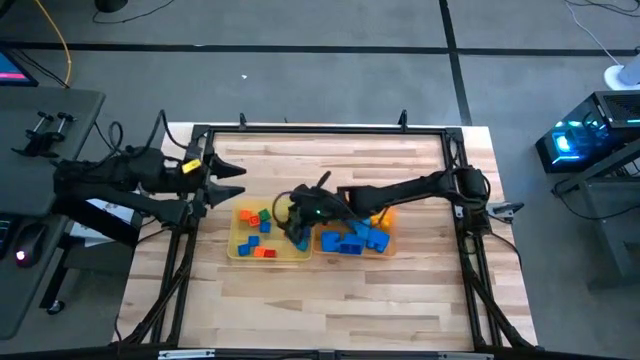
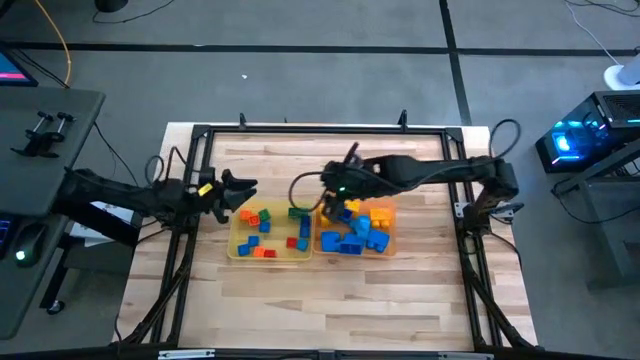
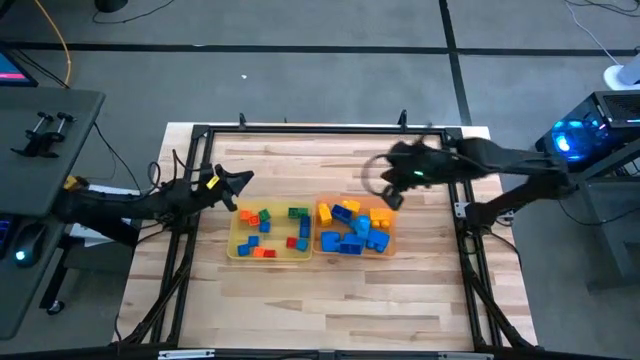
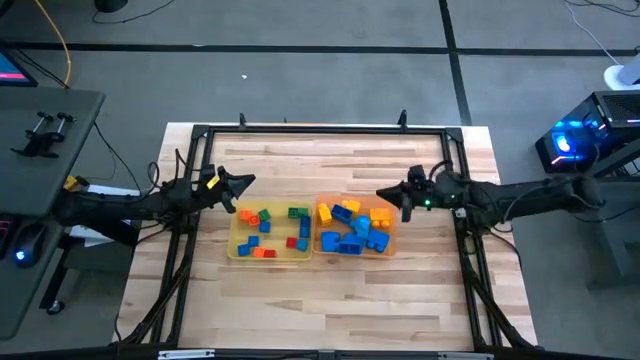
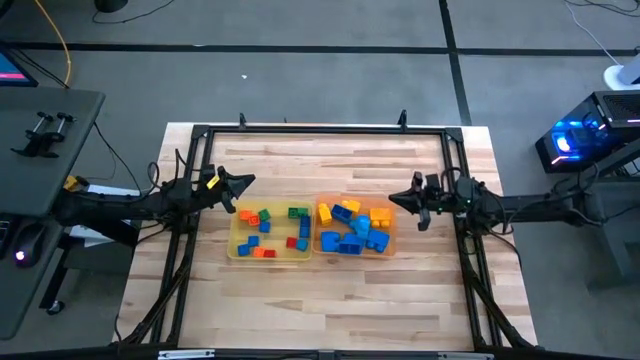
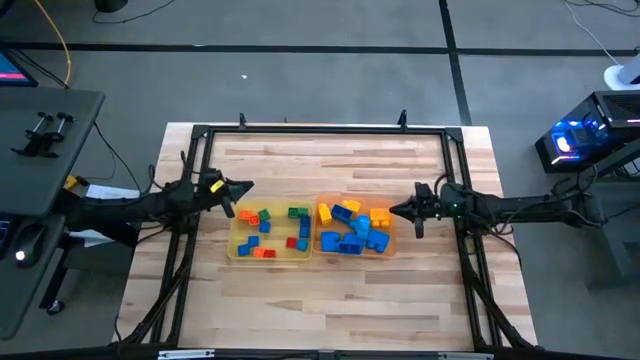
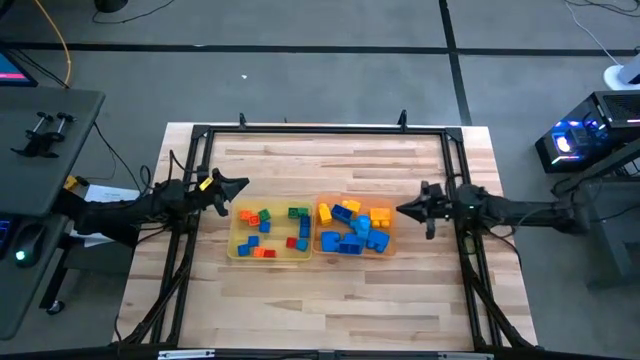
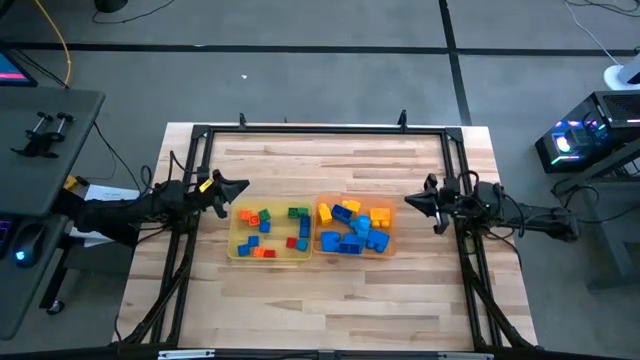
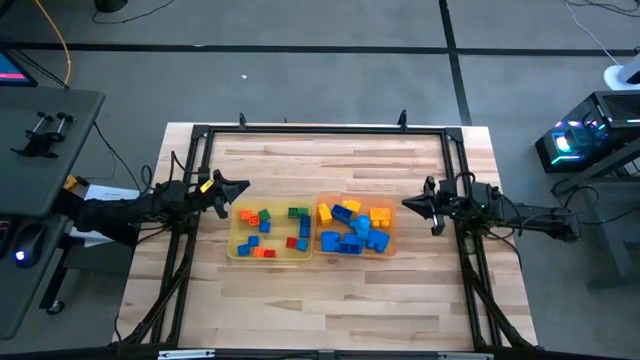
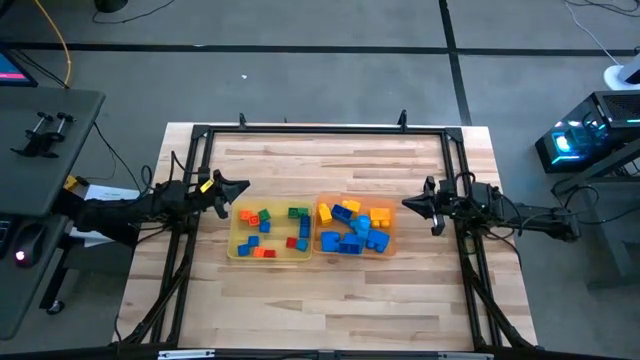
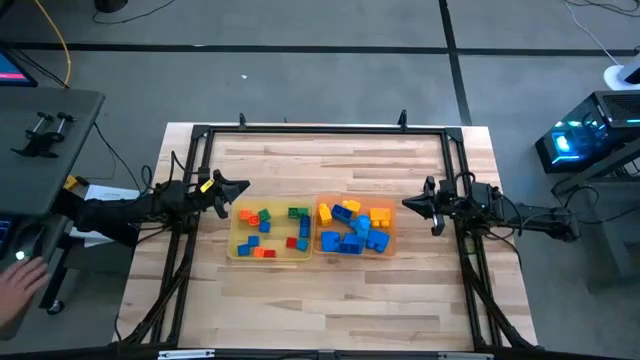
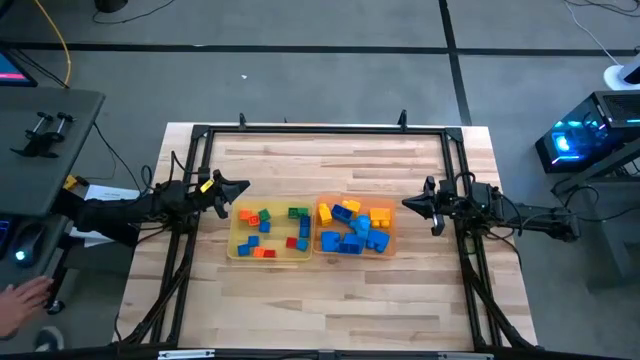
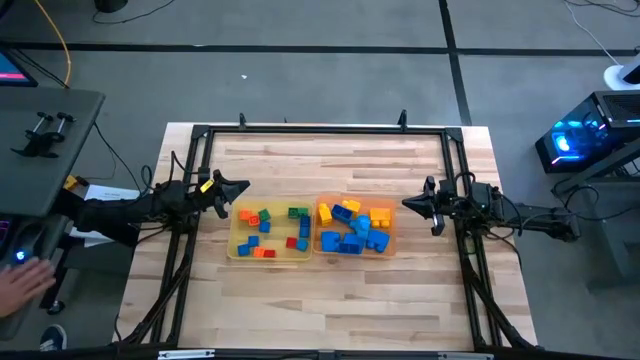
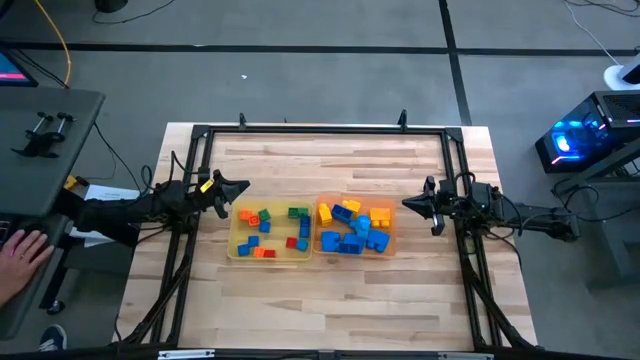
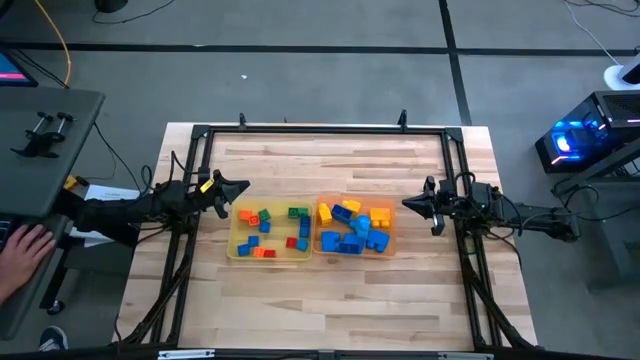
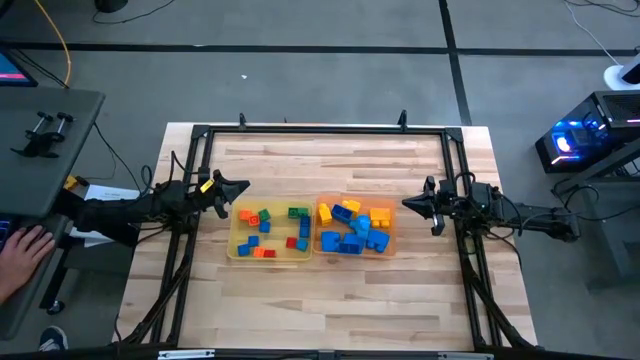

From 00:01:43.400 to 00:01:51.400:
Task: Sort blocks by size
Return to Home Position

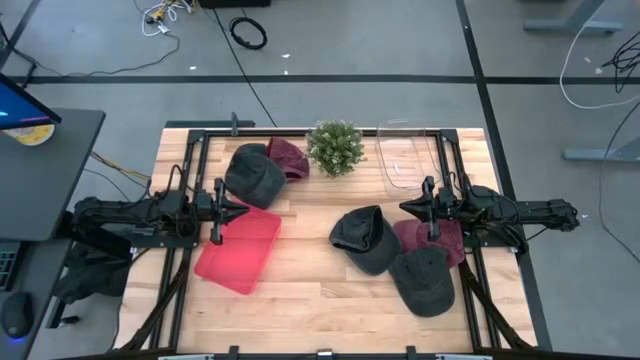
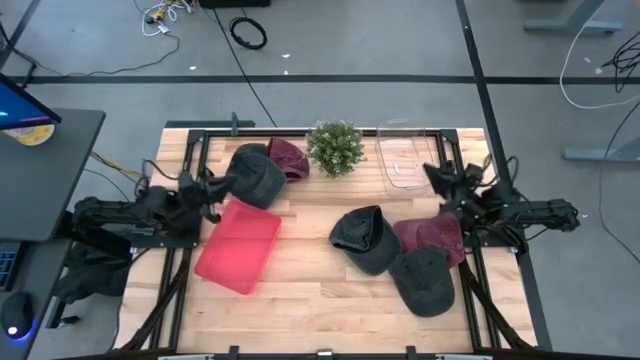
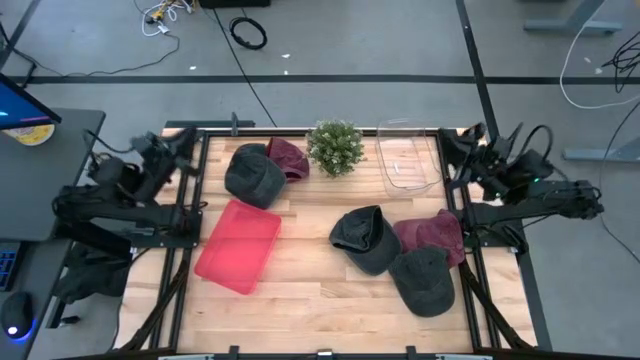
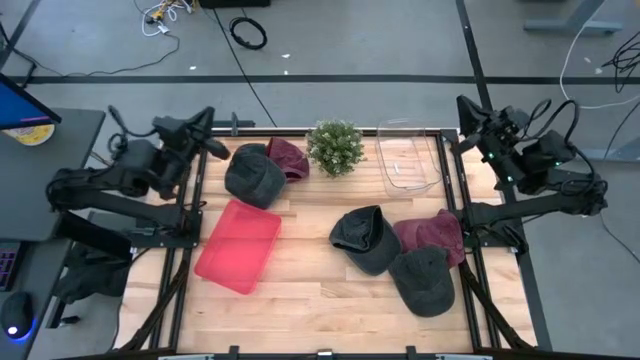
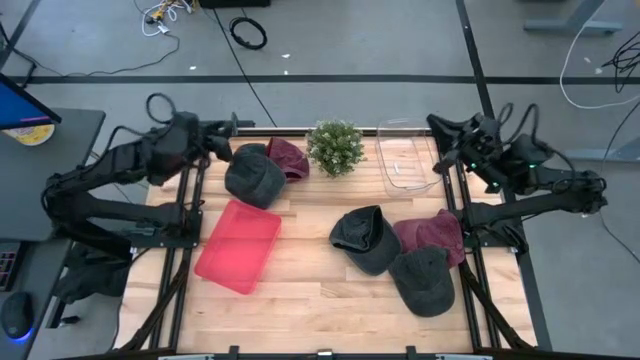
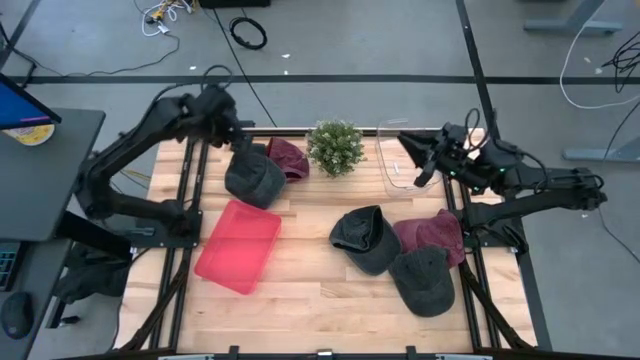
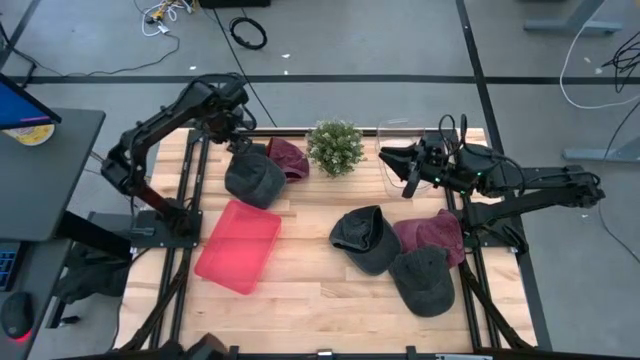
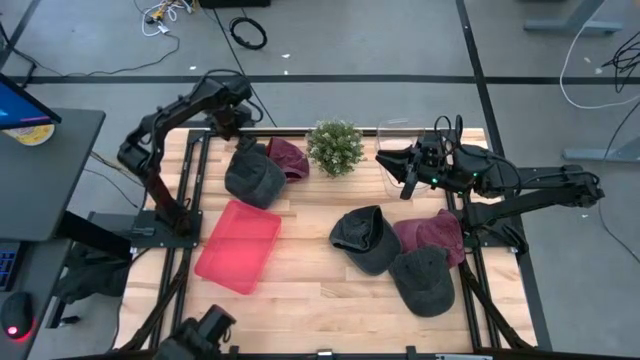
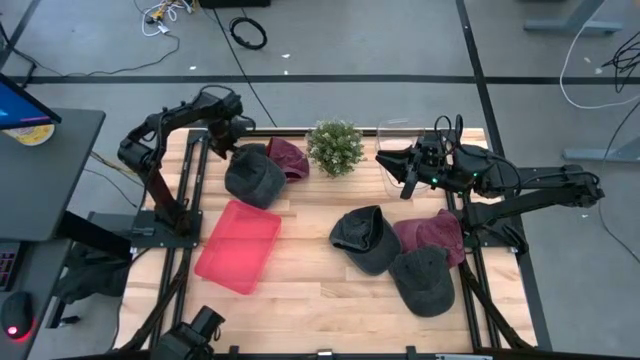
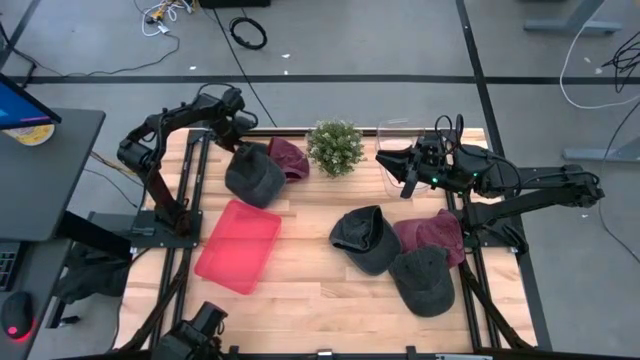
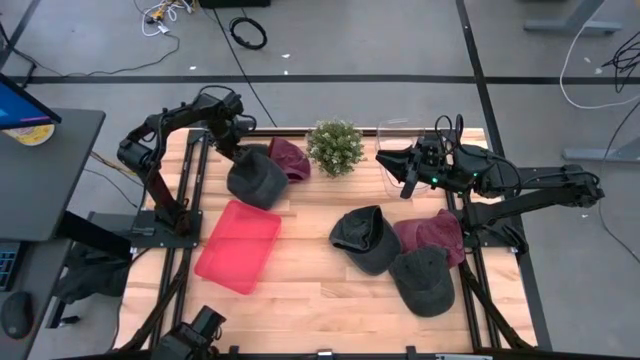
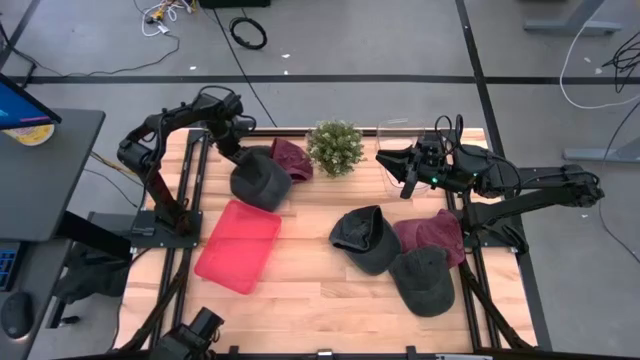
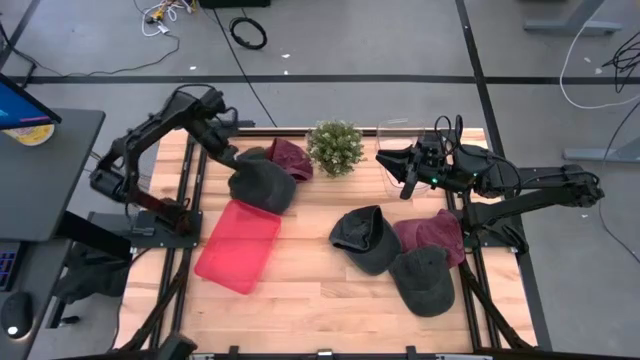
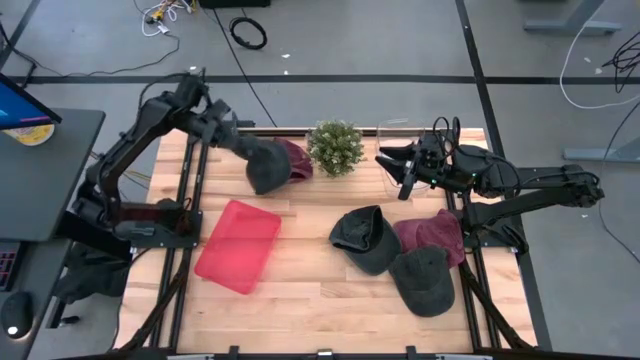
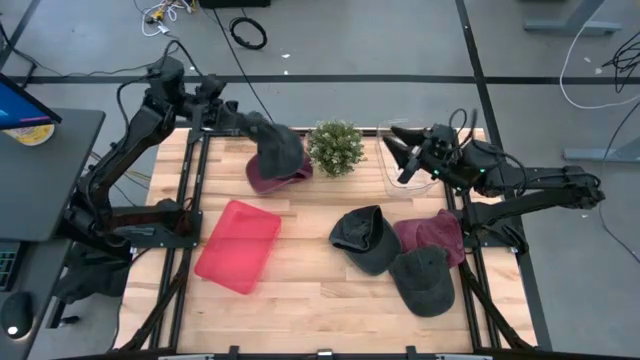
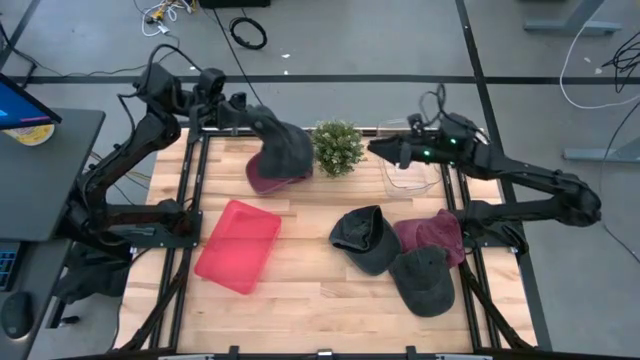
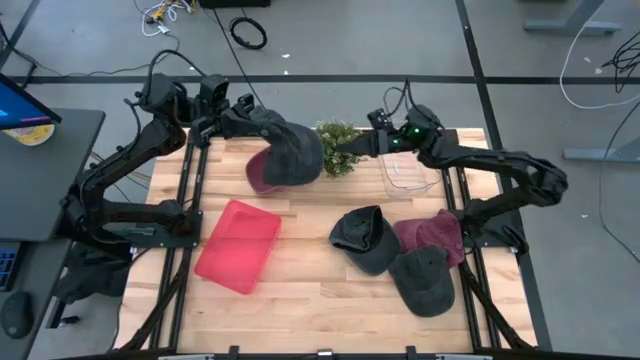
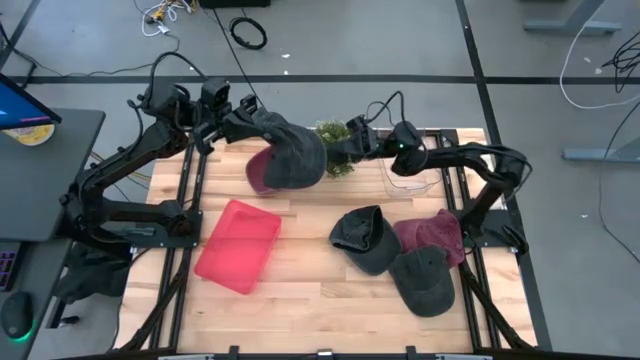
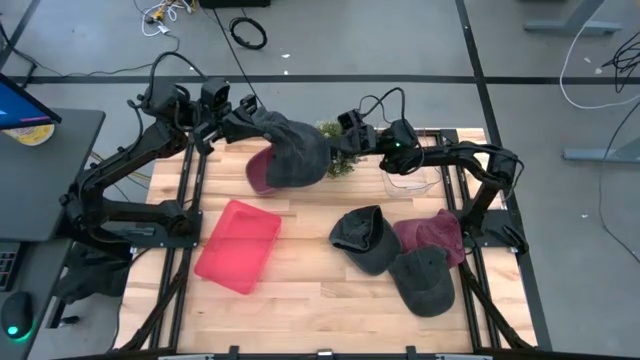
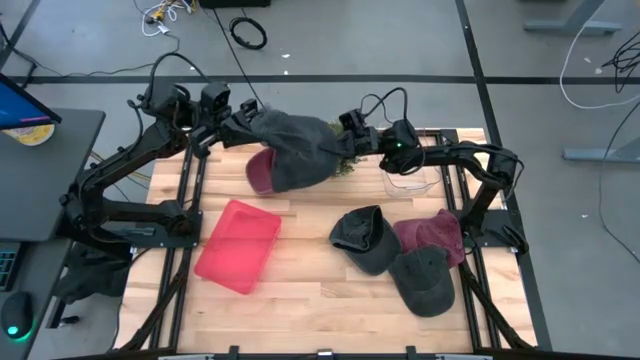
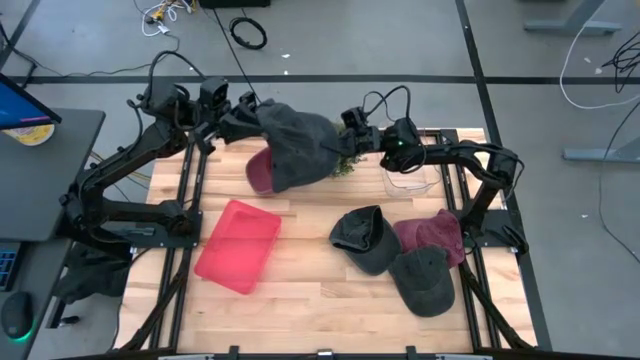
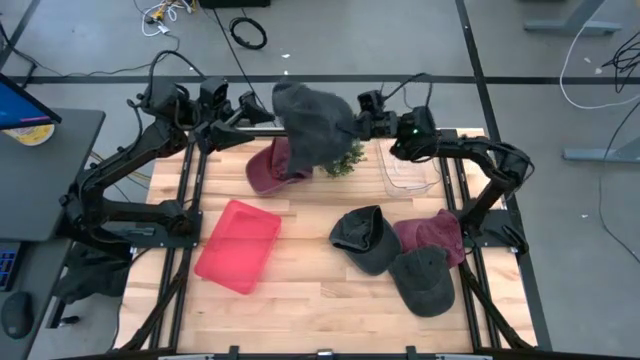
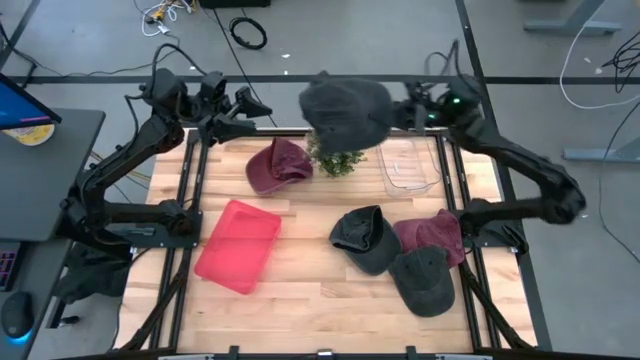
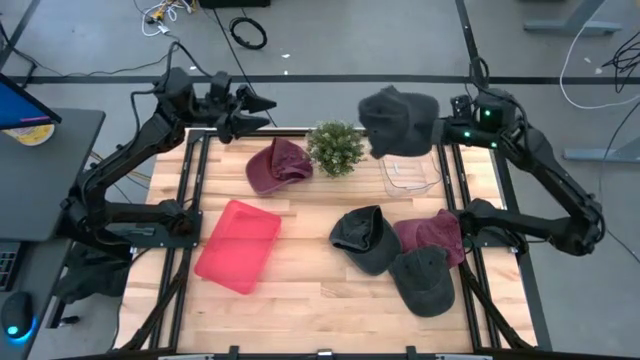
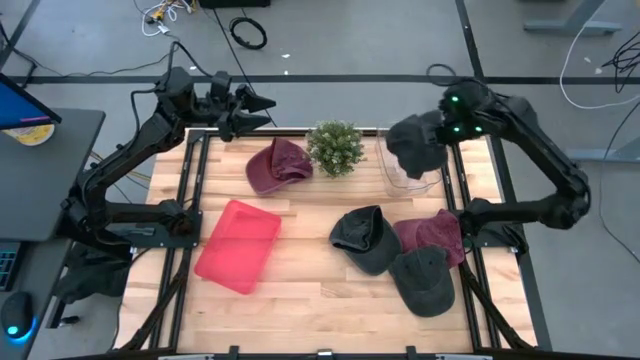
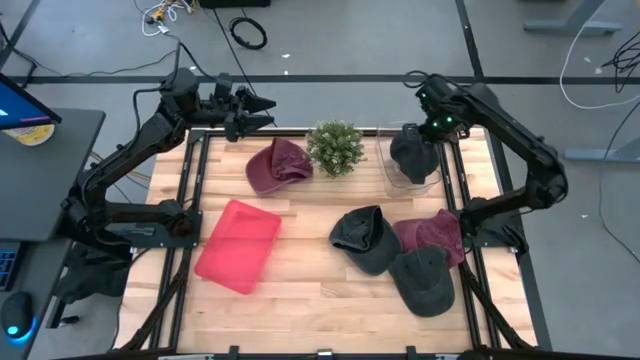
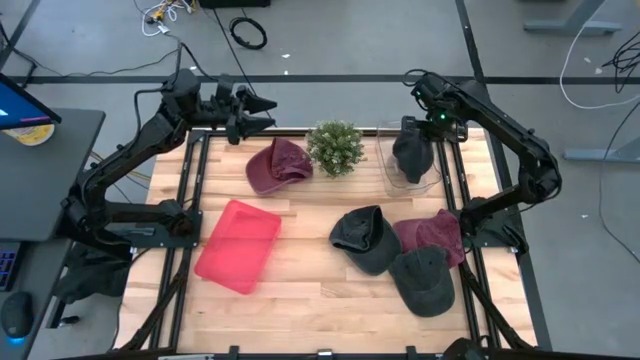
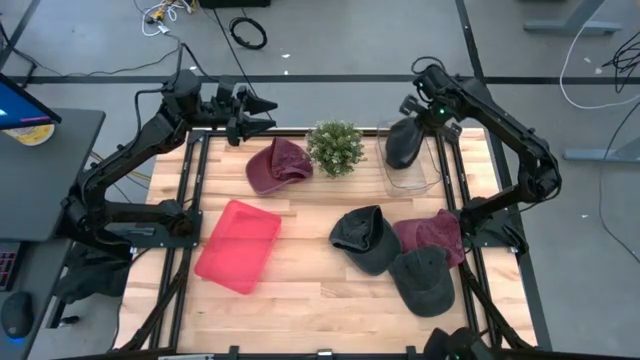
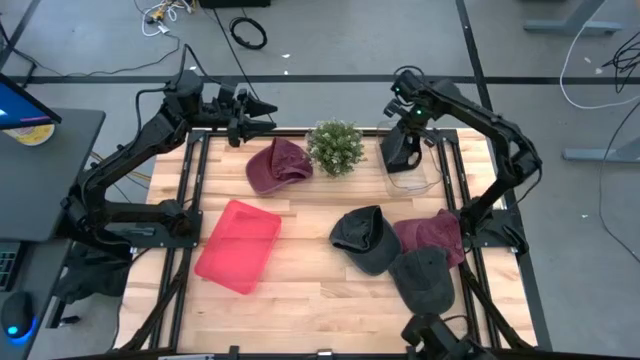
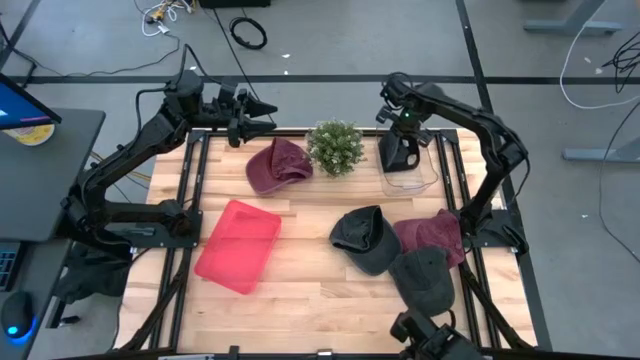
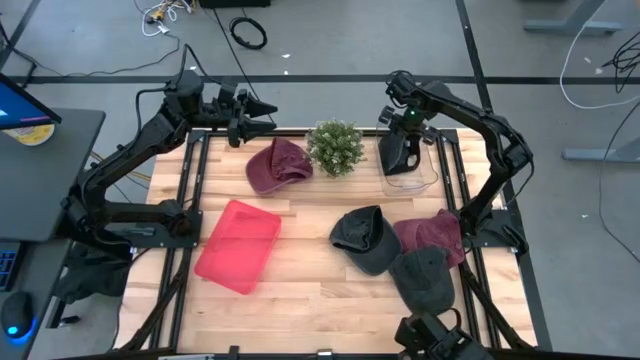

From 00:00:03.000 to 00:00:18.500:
Task: Pick & Place hat
Put the top black cap into the transparent bin
